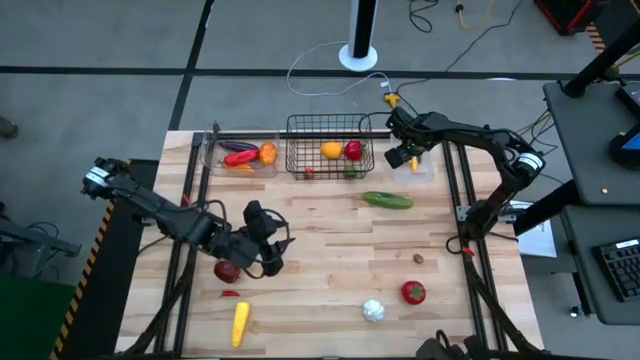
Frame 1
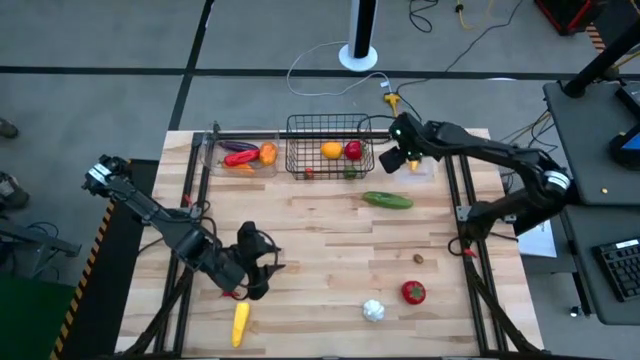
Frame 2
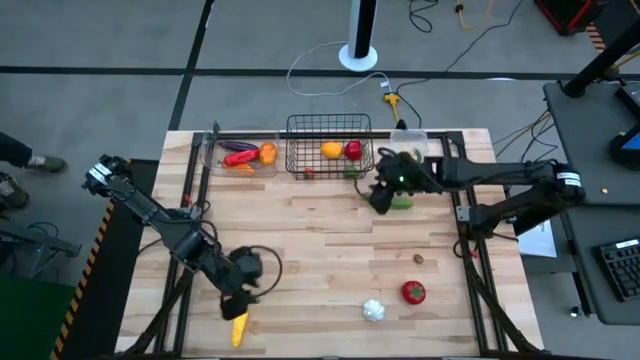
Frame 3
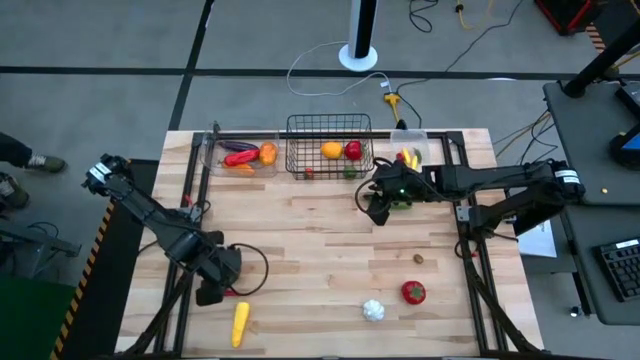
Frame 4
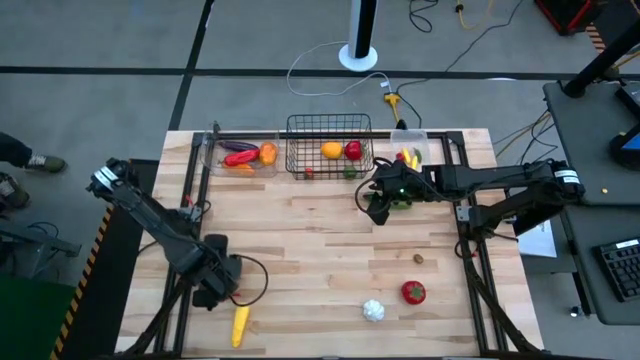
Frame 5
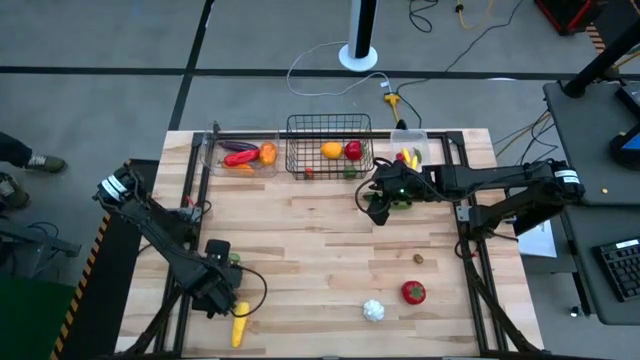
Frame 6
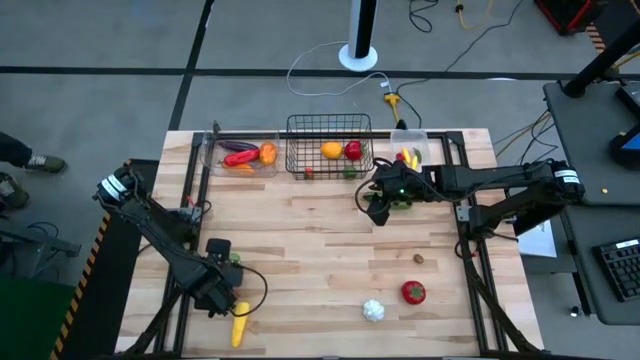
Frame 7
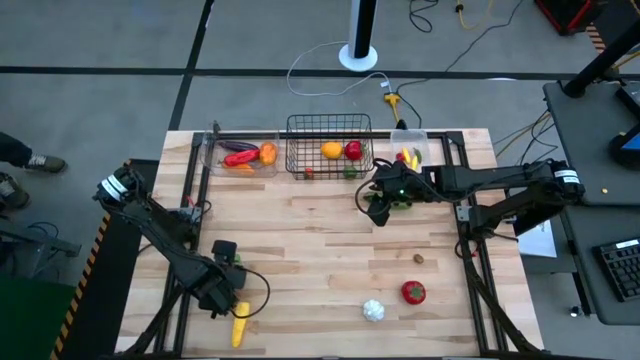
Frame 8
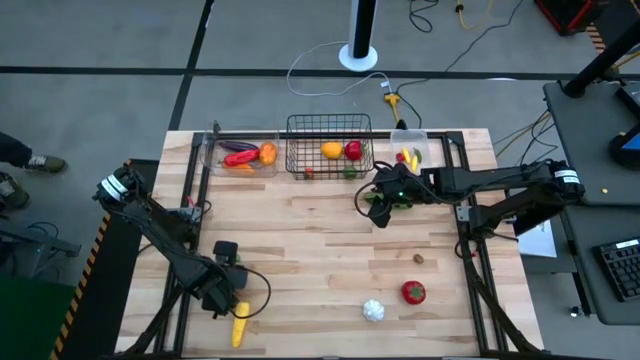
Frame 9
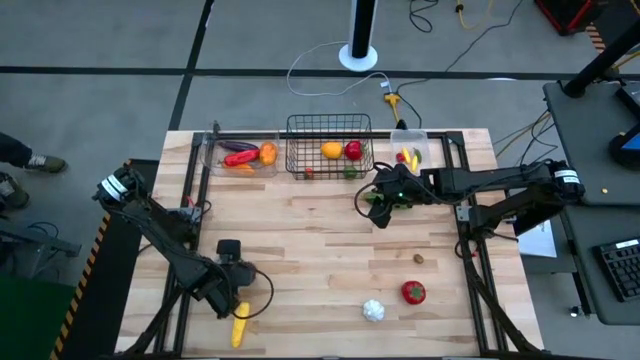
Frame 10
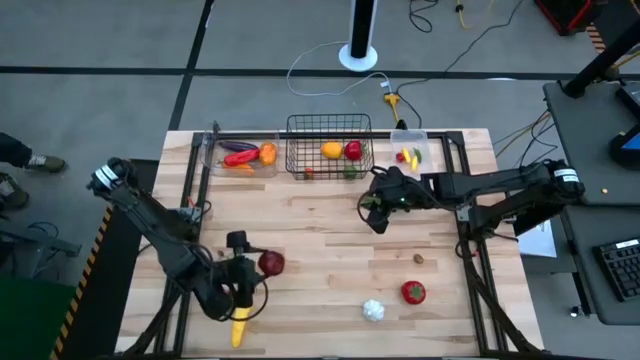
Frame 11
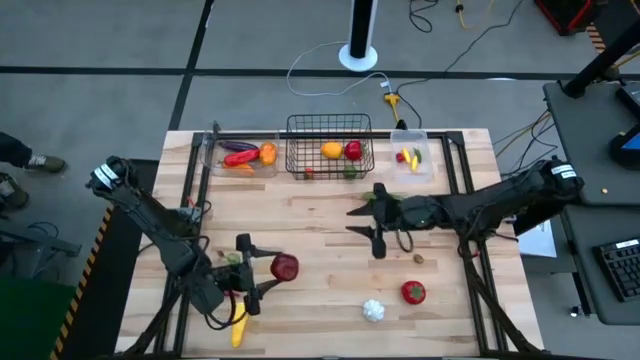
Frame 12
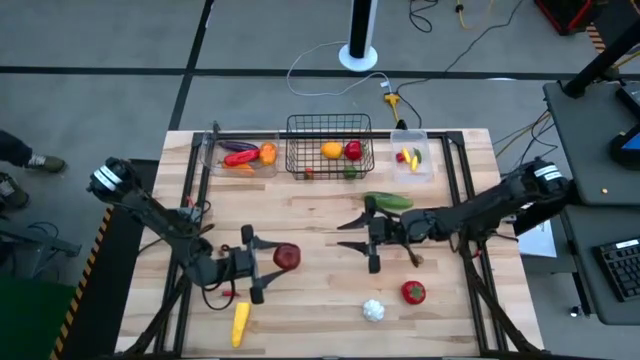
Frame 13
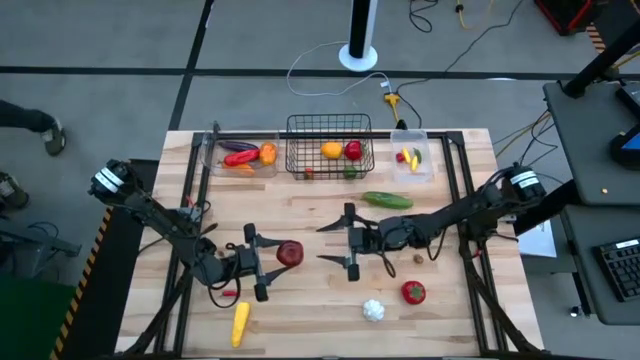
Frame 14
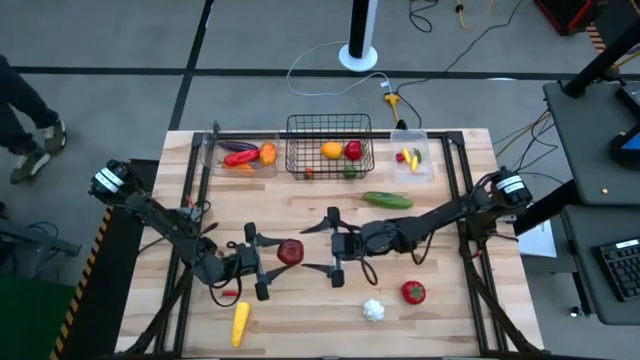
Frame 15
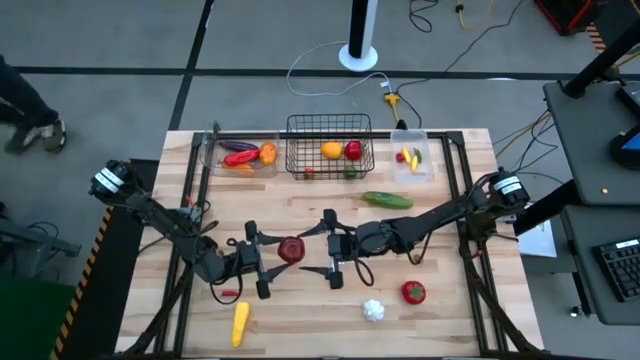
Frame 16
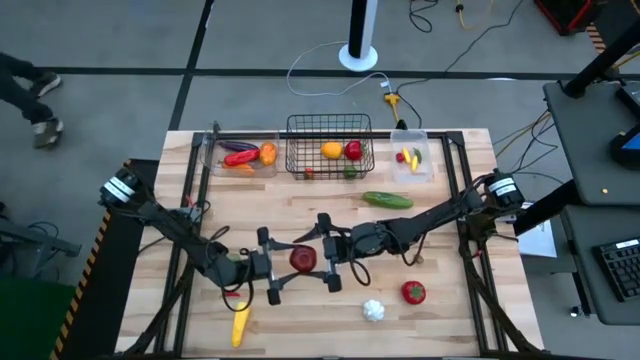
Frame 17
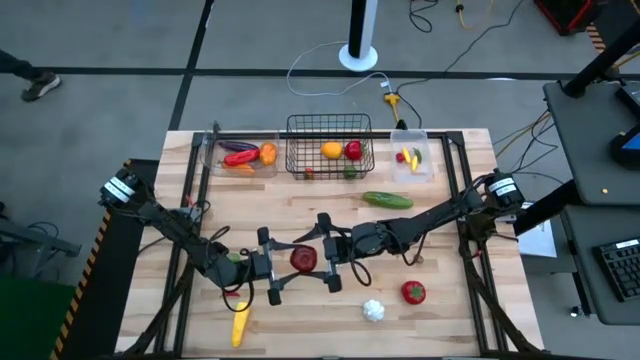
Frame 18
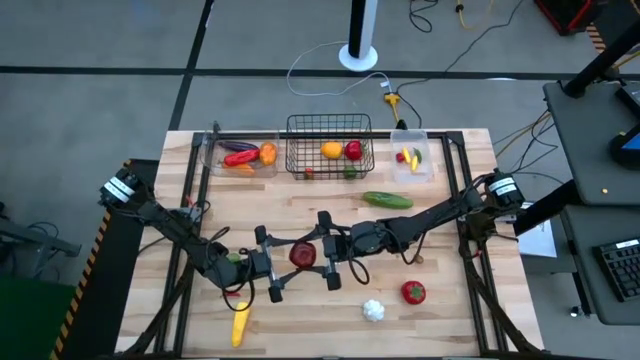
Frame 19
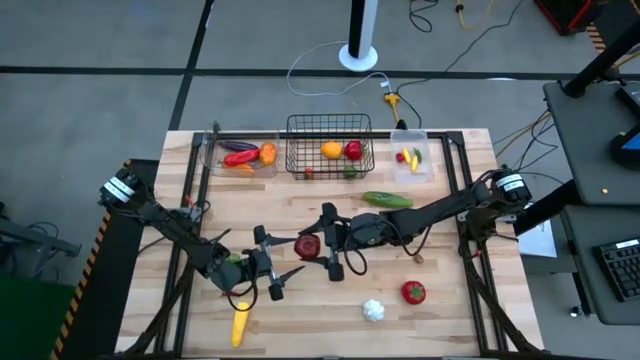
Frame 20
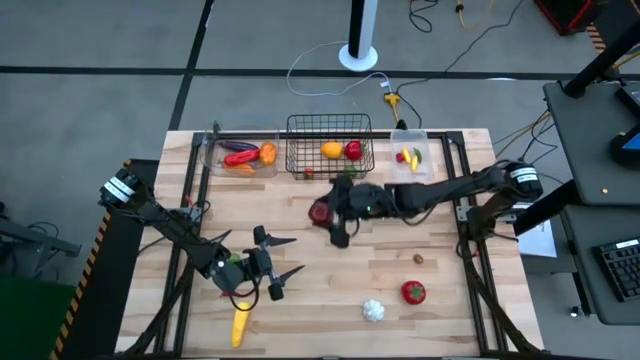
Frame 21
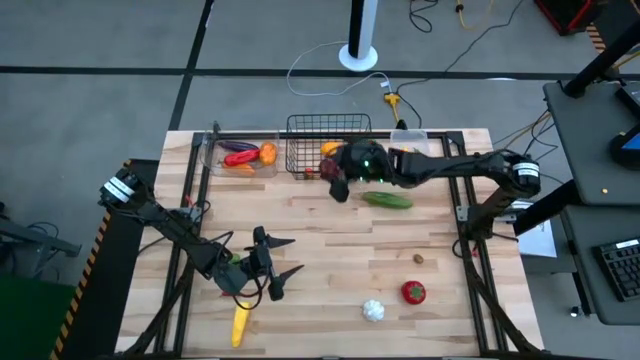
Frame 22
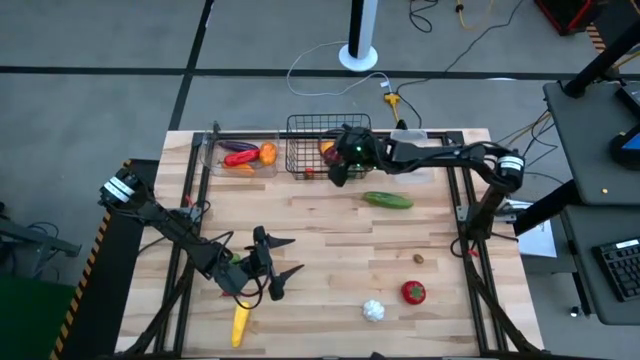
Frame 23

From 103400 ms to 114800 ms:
Task: Sort produce into baskets
Put the apple into the wire basket

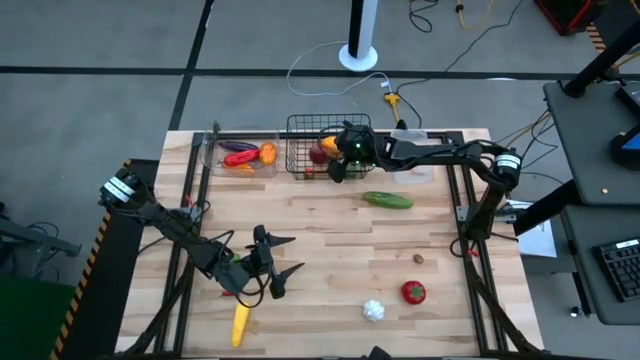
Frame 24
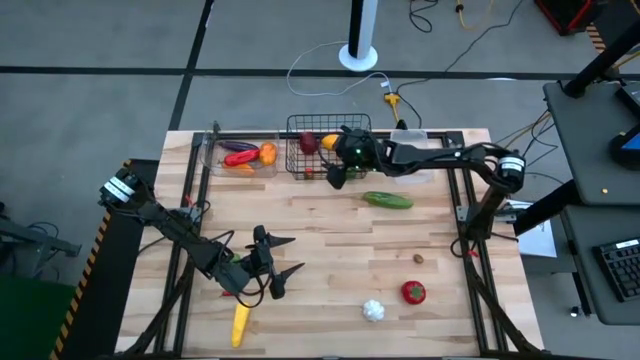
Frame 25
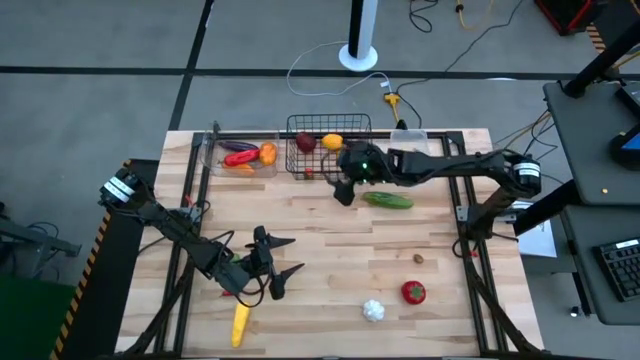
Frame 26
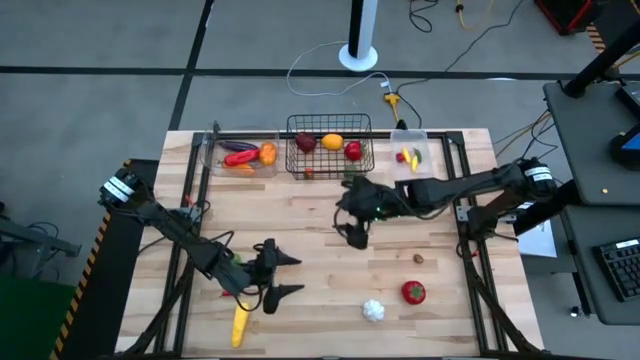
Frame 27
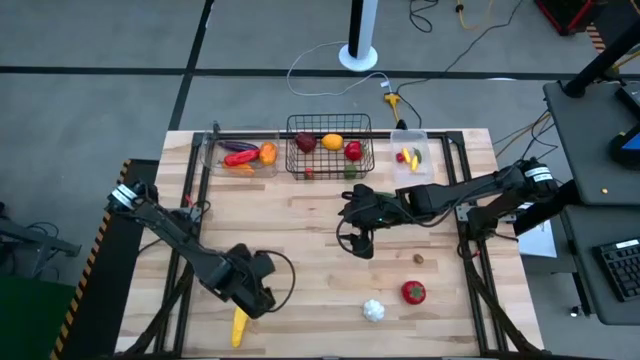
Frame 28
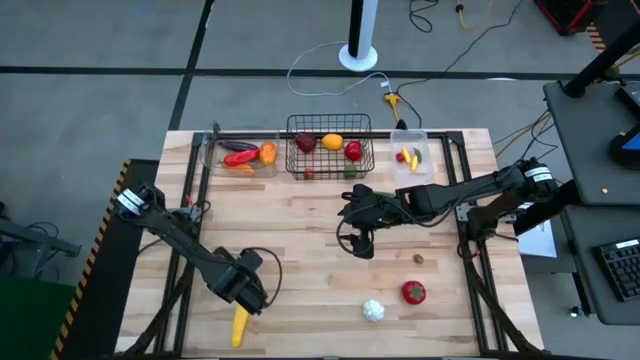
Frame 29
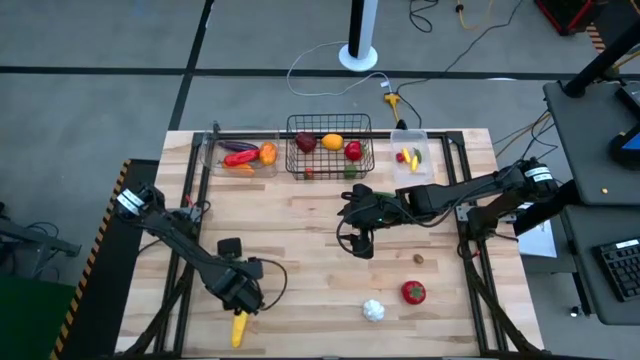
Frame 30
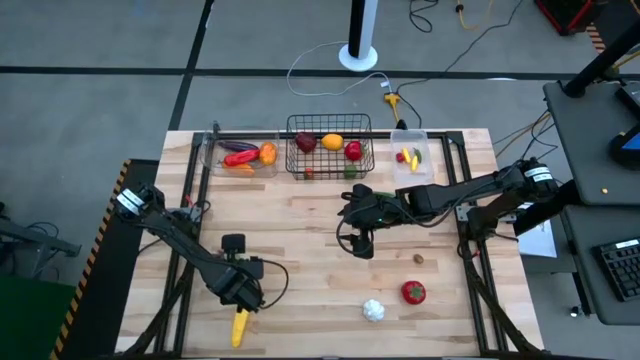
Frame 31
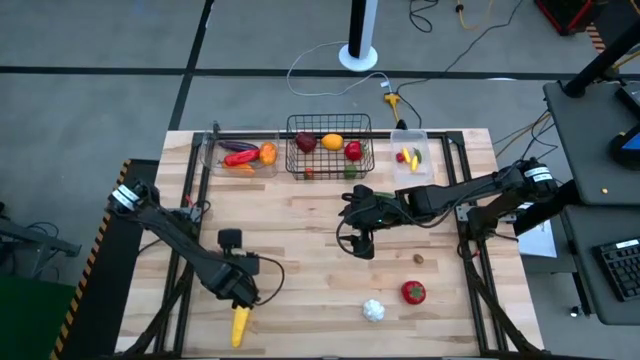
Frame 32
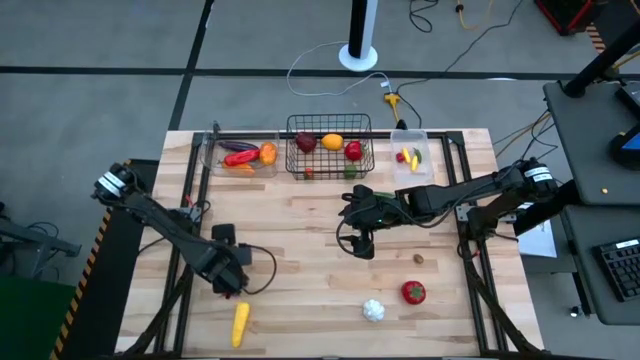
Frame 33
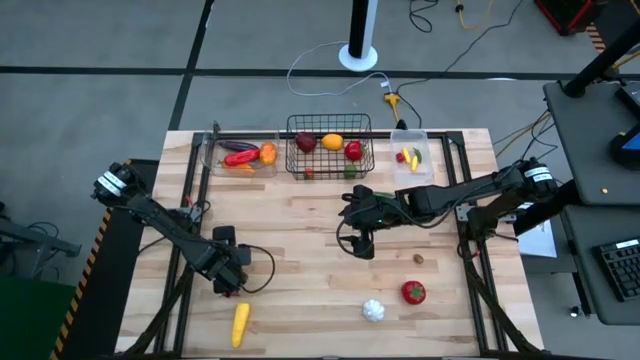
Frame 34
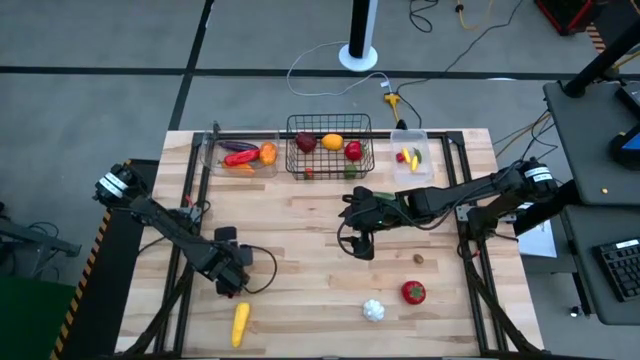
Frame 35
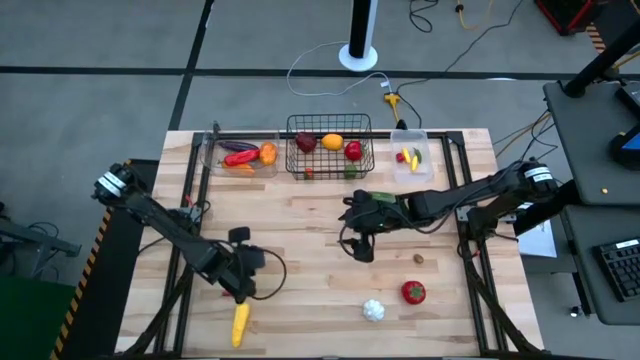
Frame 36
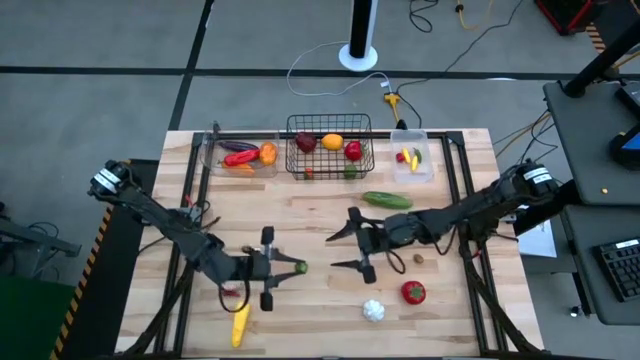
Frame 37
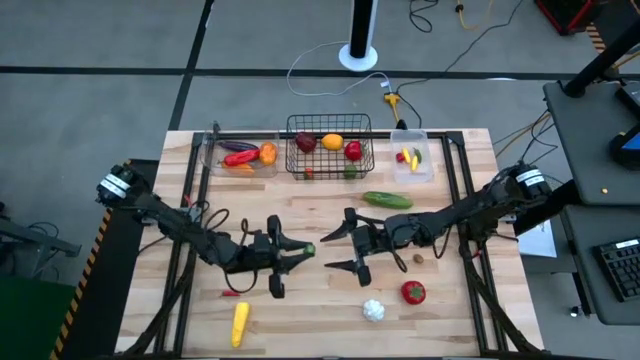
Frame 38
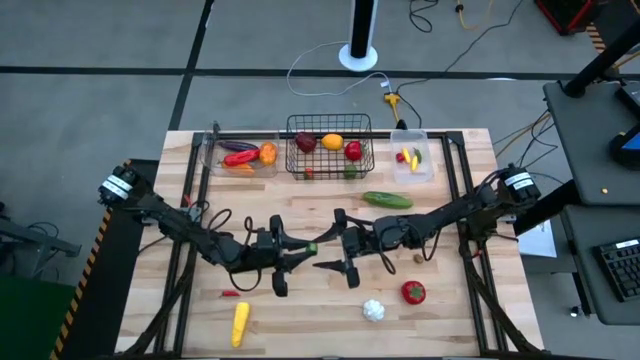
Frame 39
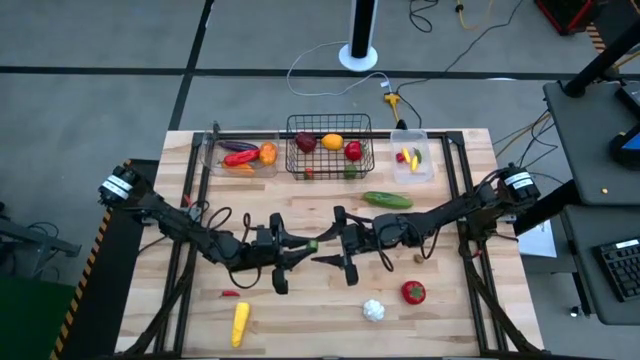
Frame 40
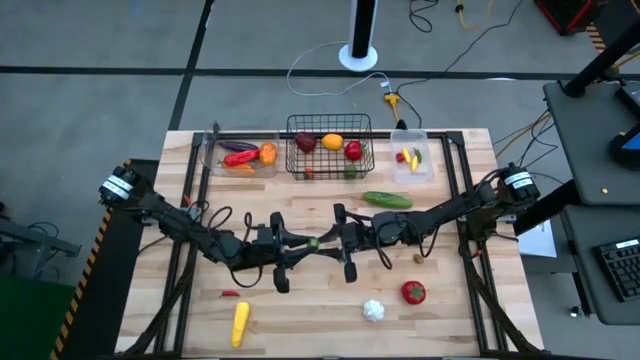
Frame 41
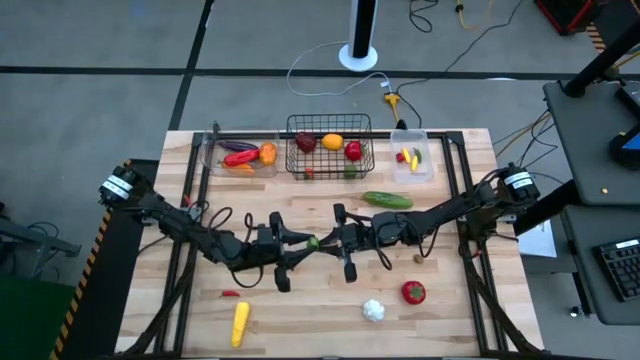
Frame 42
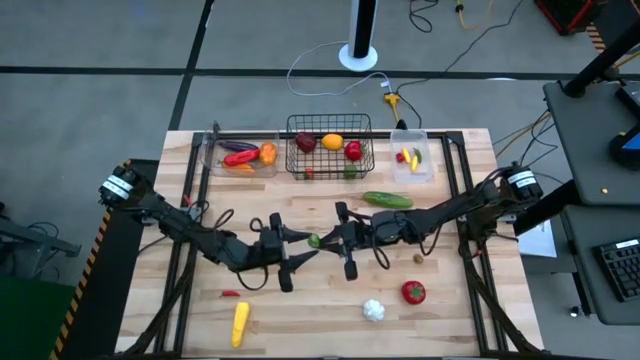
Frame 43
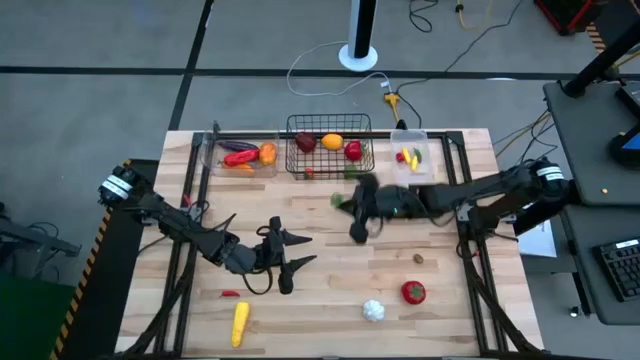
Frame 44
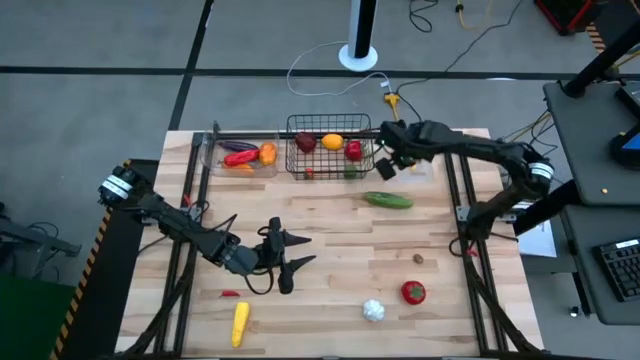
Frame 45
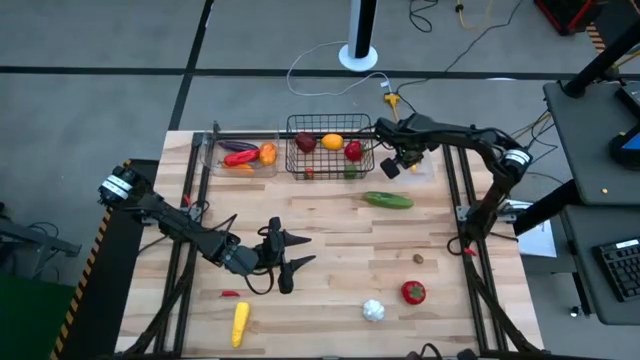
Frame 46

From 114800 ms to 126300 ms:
Put the habanero pepper into the white bin
